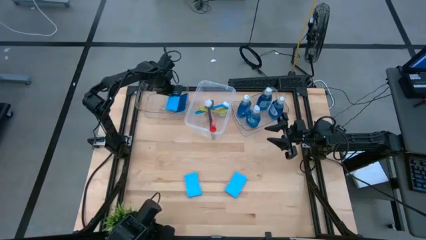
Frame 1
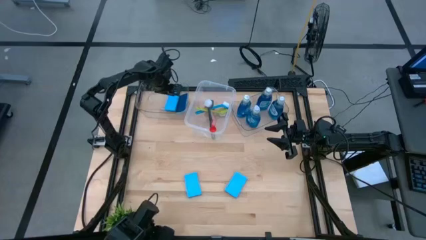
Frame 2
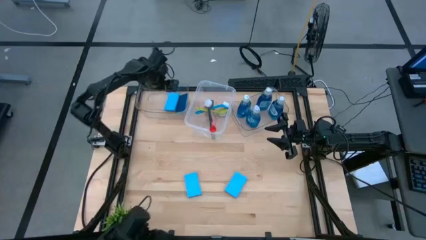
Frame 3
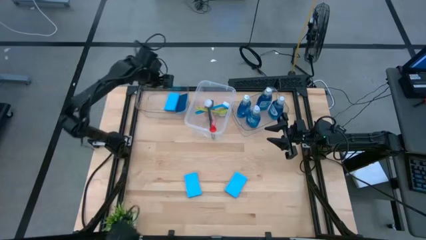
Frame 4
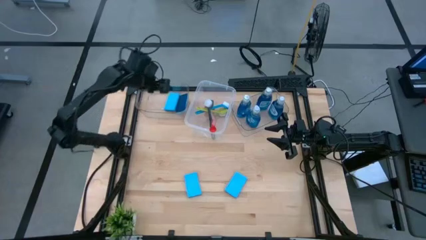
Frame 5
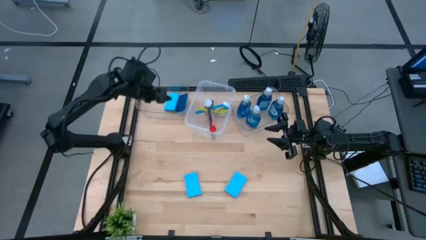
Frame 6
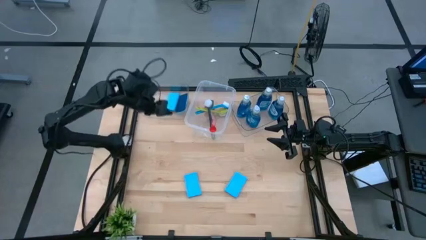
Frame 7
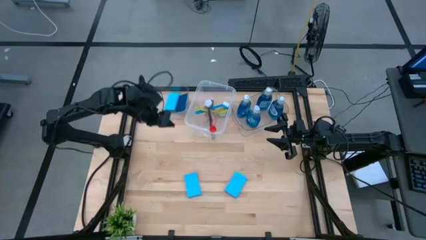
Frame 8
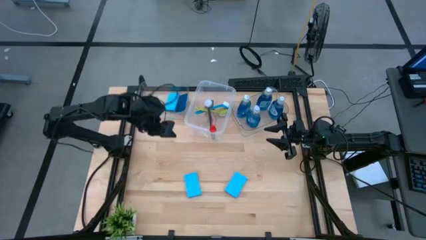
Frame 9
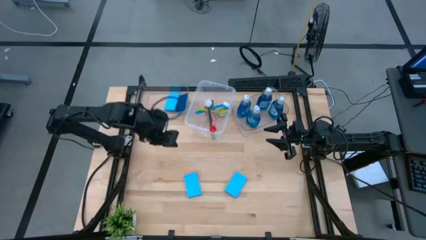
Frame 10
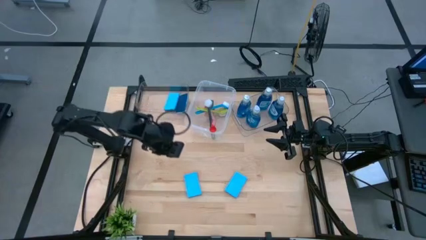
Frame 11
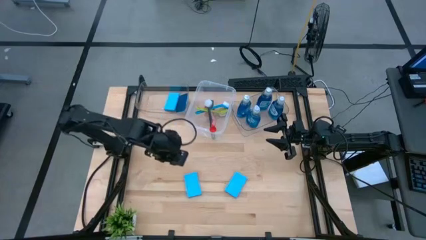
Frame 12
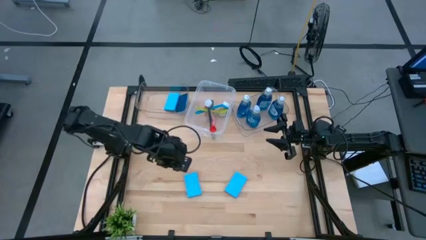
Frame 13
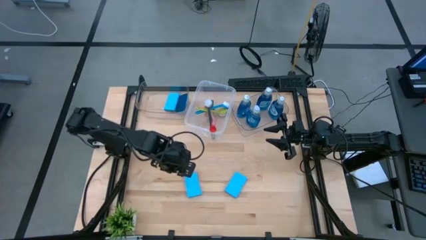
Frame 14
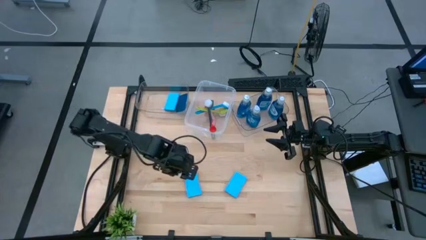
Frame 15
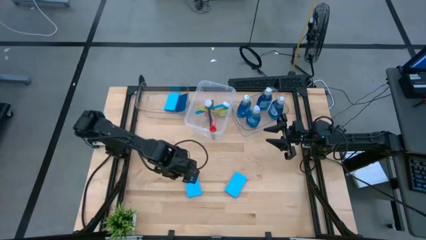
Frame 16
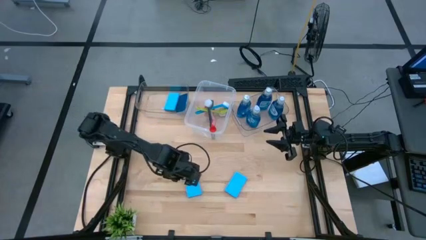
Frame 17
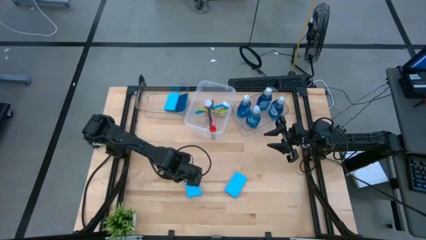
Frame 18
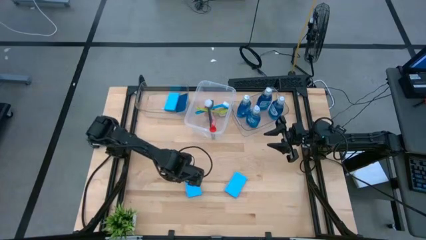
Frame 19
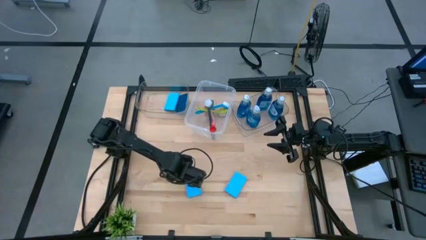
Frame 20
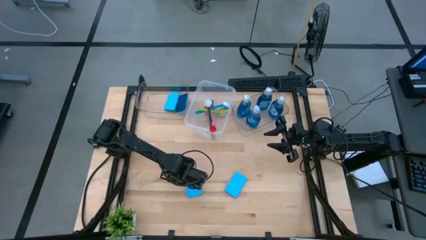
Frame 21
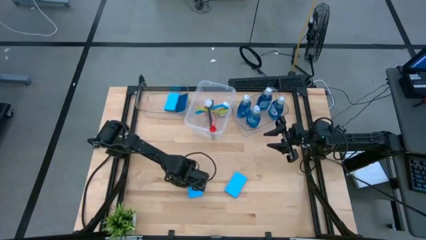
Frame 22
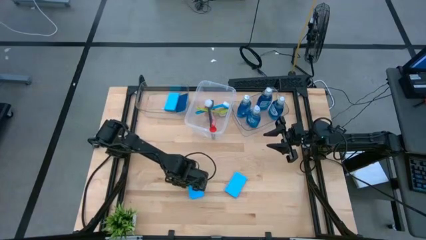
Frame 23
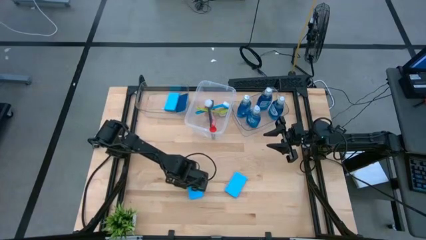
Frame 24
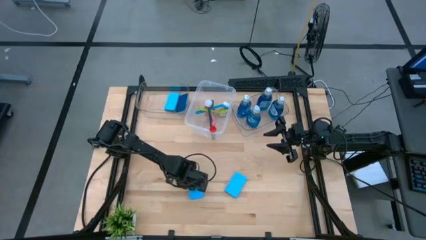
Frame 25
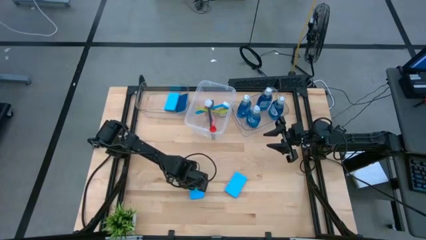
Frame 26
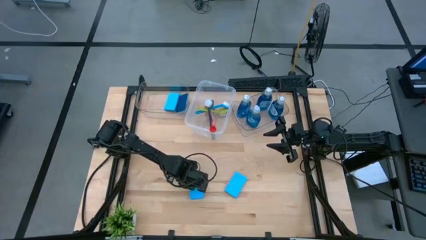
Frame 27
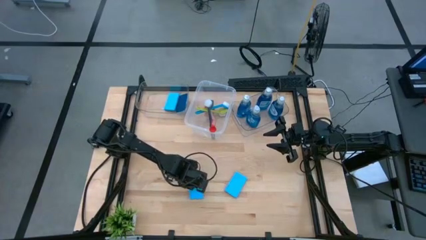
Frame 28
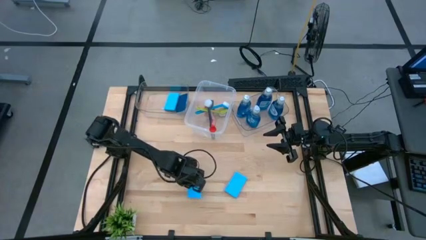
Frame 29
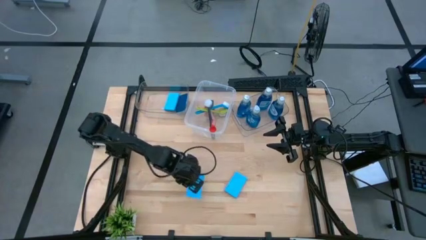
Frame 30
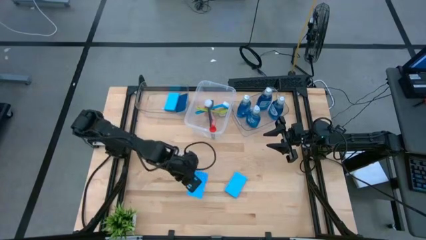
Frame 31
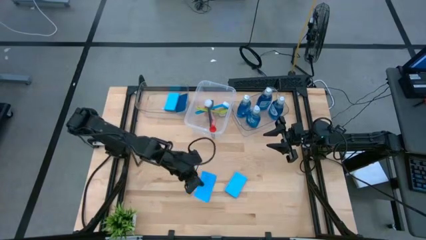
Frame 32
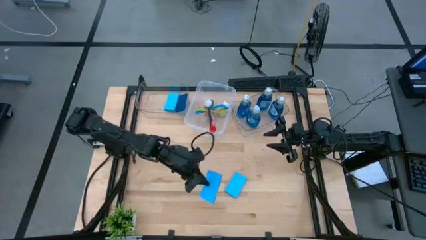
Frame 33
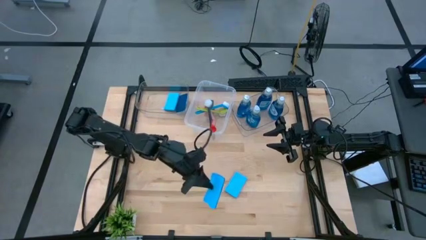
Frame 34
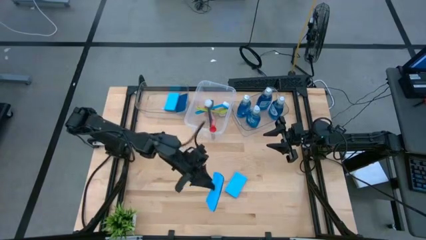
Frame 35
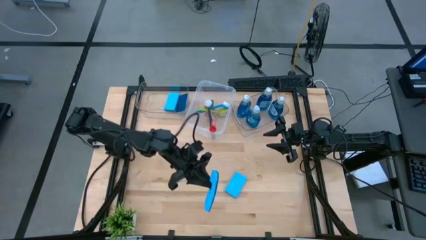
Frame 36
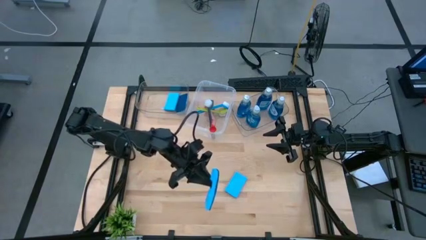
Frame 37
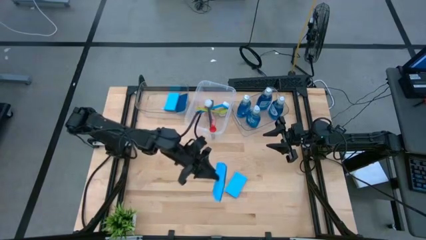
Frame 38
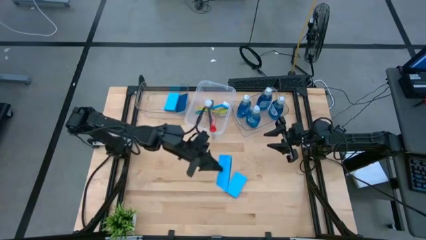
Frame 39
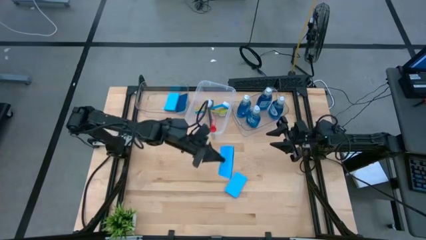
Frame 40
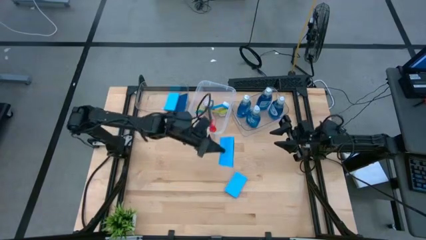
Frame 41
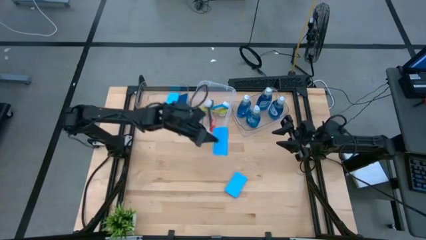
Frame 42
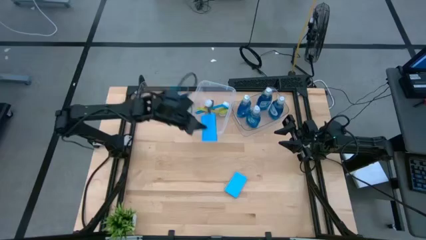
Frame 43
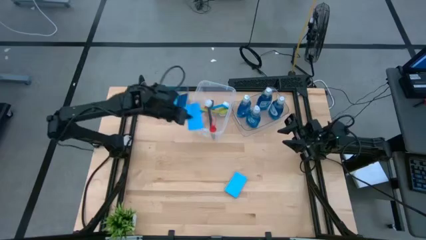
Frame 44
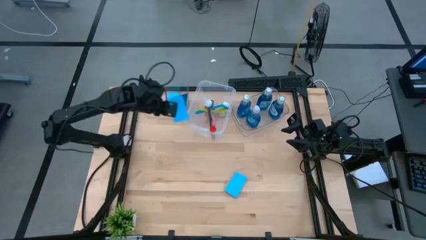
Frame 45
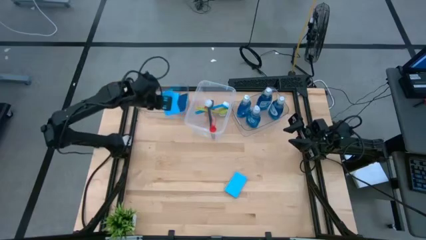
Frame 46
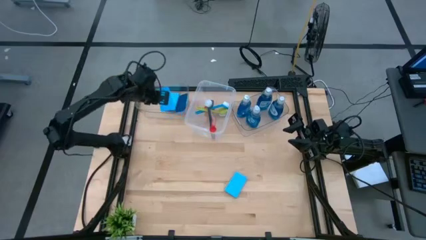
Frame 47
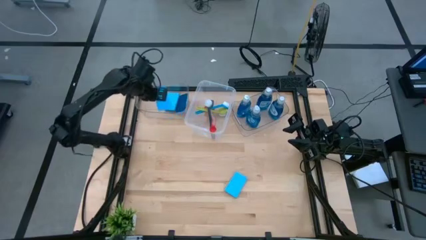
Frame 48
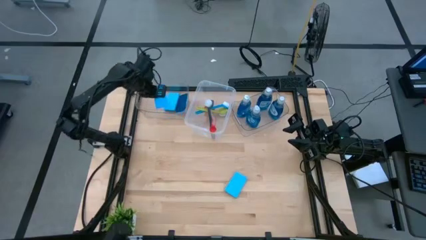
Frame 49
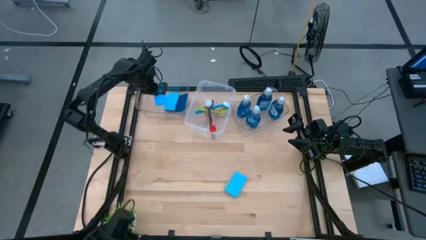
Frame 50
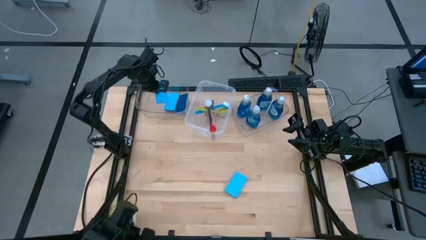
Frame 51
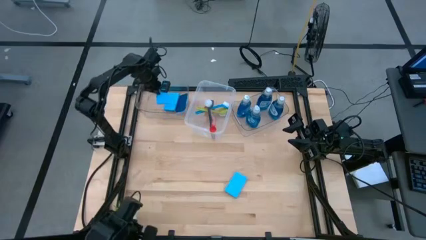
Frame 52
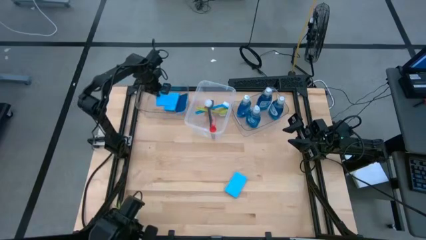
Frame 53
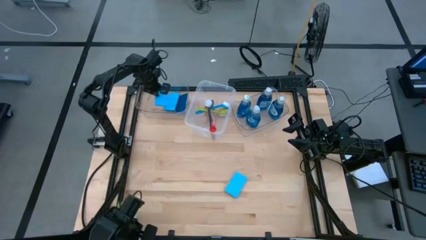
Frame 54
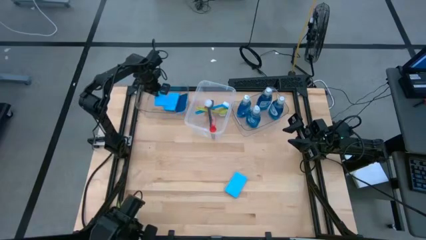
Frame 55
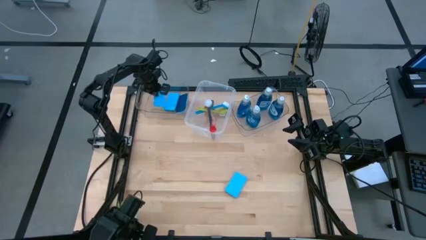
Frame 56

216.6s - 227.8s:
Task: Pick & Place Kitchen Sink Supplies
Put the blue sponge into the left transparent bin

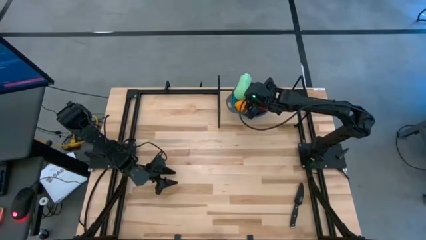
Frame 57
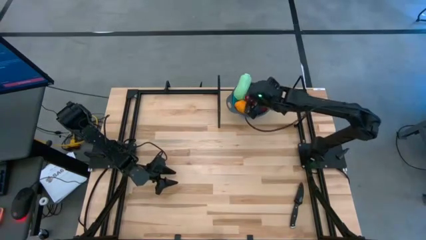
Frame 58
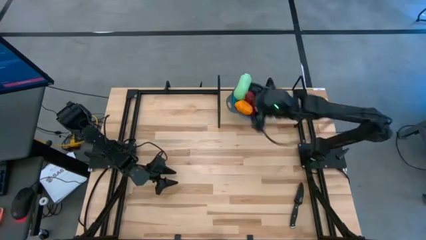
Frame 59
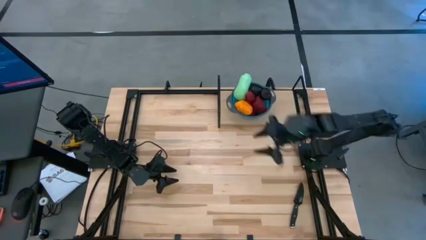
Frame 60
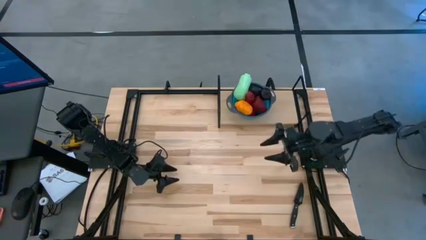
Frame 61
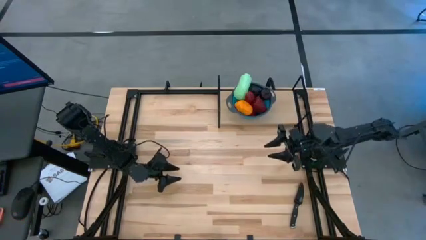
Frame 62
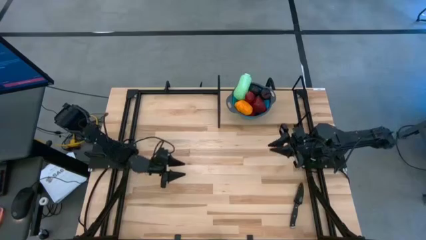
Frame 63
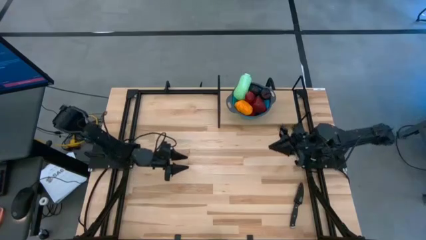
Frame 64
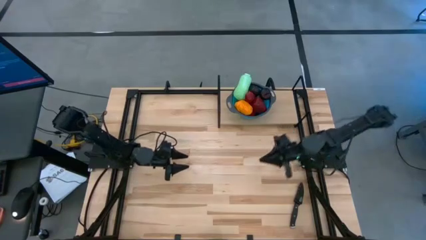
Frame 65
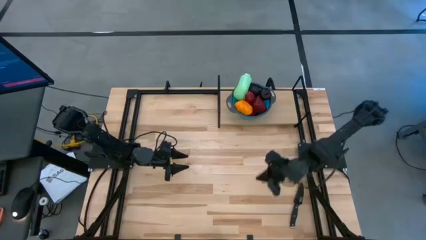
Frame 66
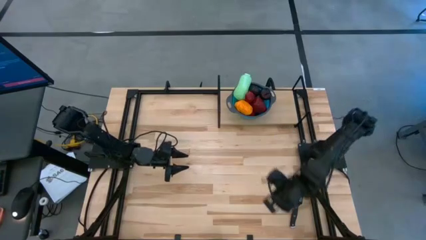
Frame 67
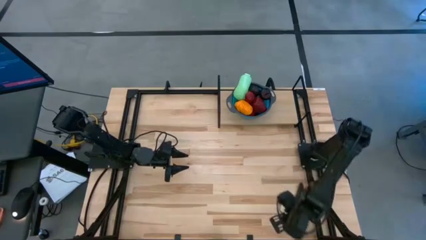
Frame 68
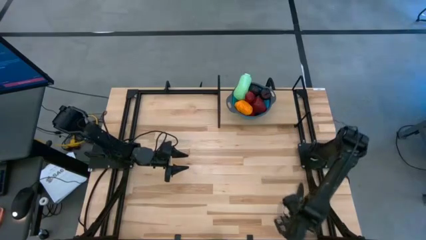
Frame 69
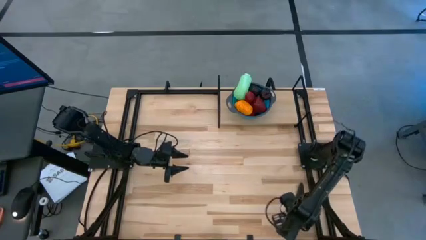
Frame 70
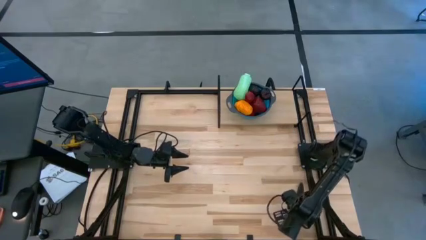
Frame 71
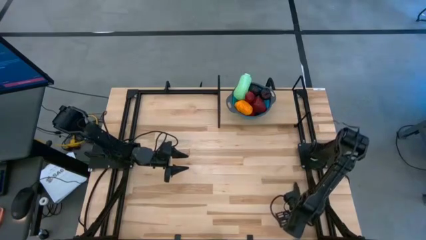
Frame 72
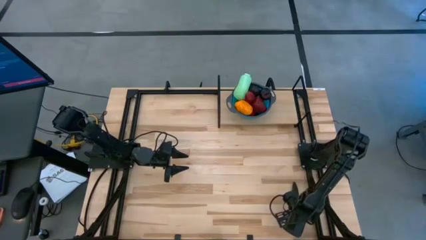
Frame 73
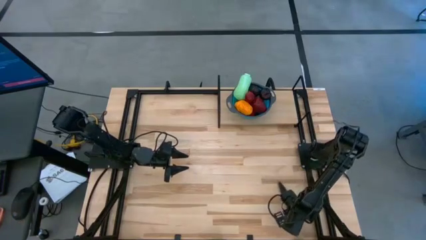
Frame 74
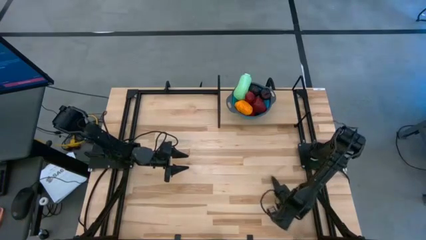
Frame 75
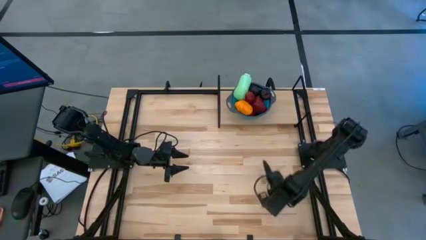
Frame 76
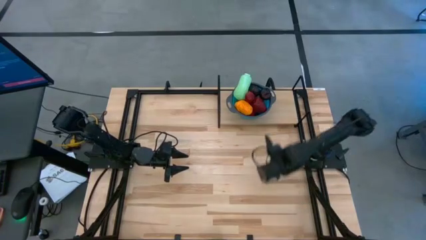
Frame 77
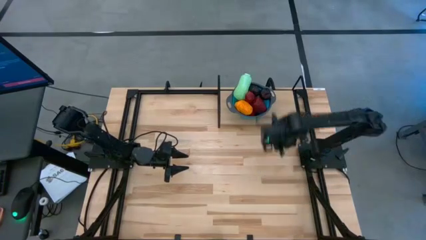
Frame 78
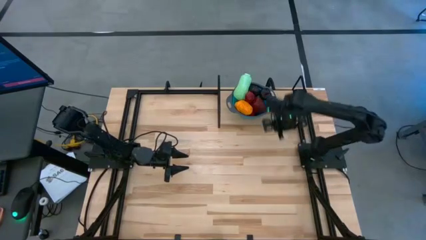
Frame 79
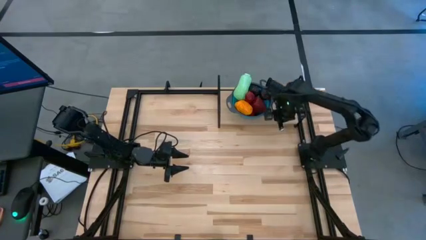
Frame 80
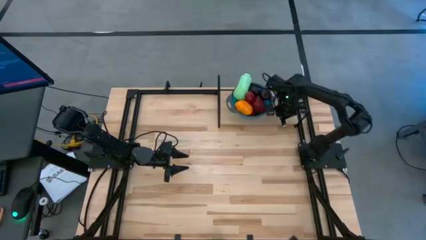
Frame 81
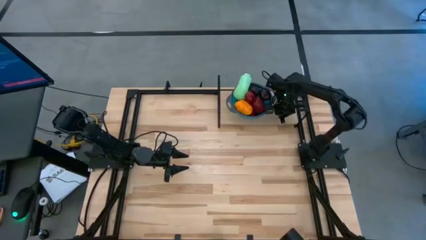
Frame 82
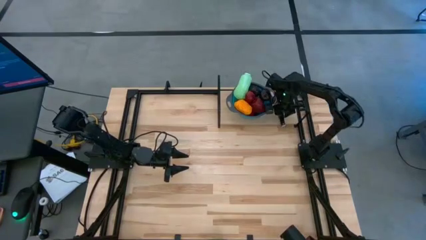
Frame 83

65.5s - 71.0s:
Task: Pick & Place Fruit
Put the black knife on the shelf
